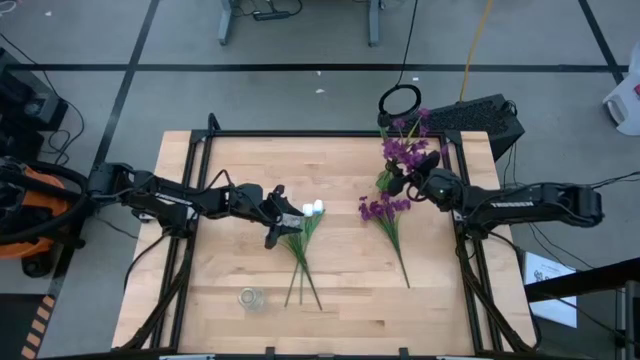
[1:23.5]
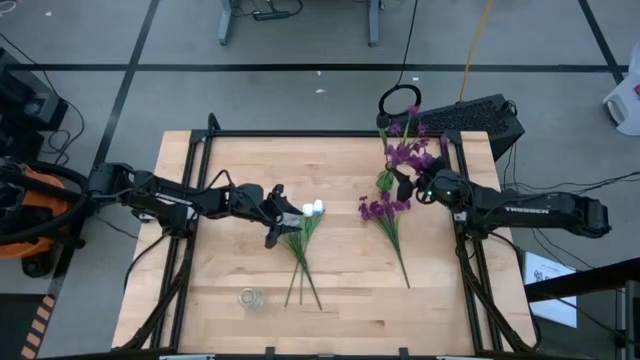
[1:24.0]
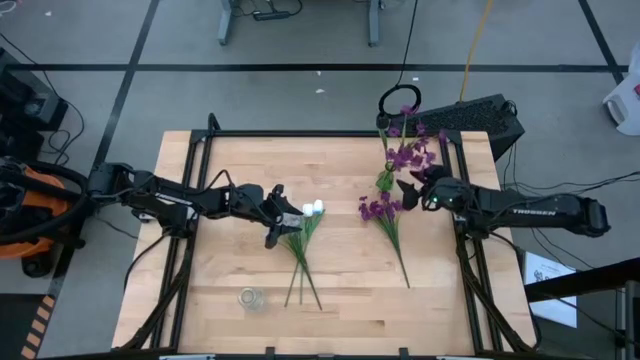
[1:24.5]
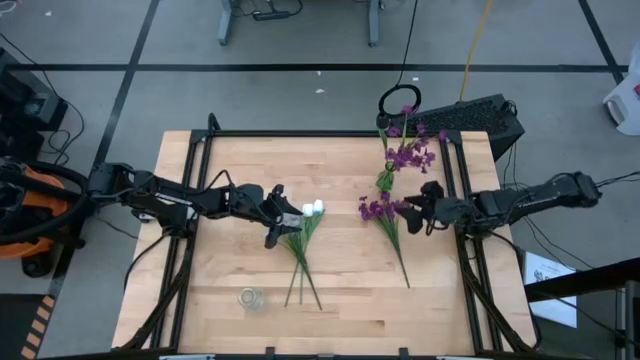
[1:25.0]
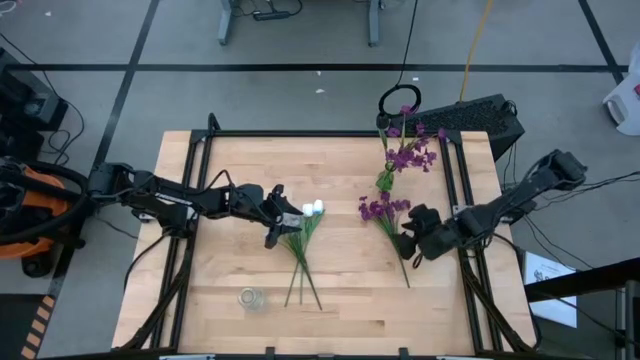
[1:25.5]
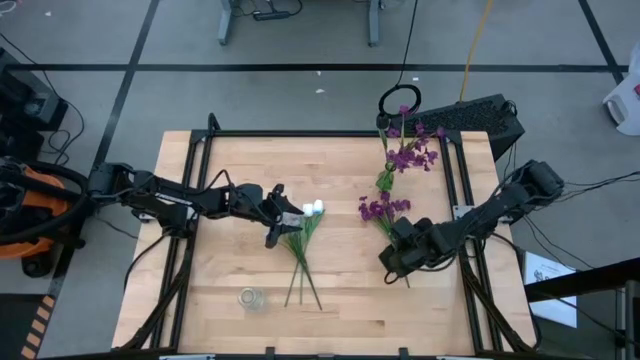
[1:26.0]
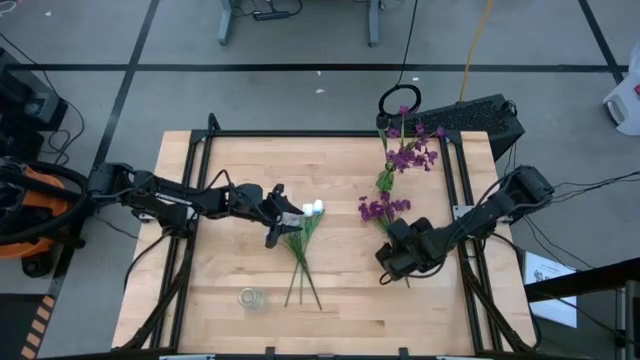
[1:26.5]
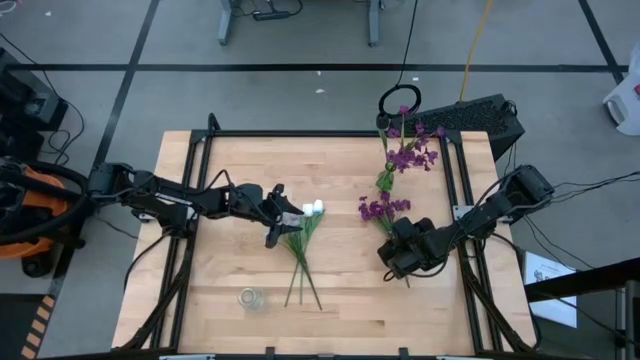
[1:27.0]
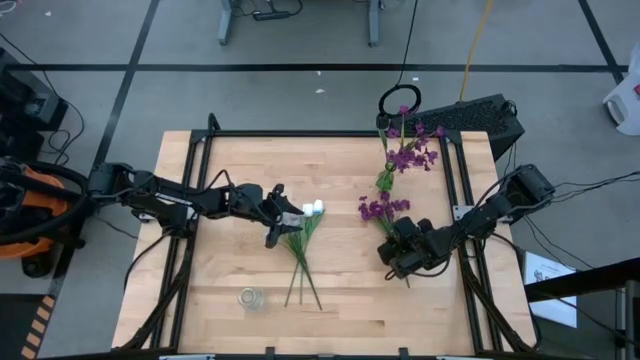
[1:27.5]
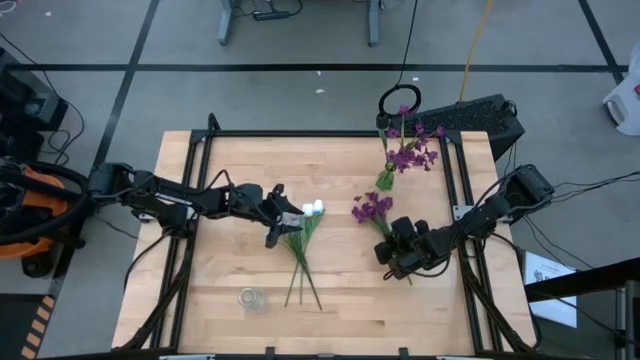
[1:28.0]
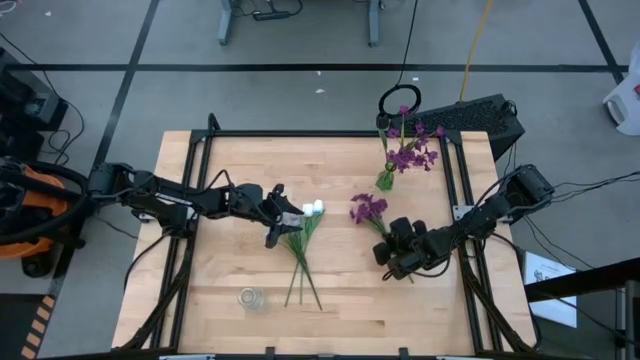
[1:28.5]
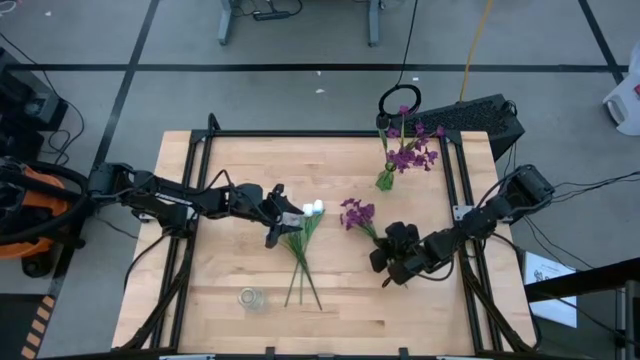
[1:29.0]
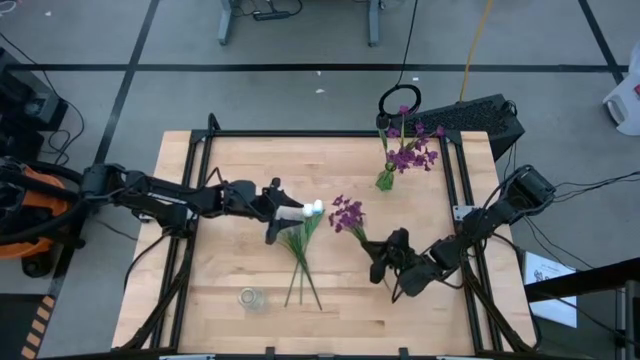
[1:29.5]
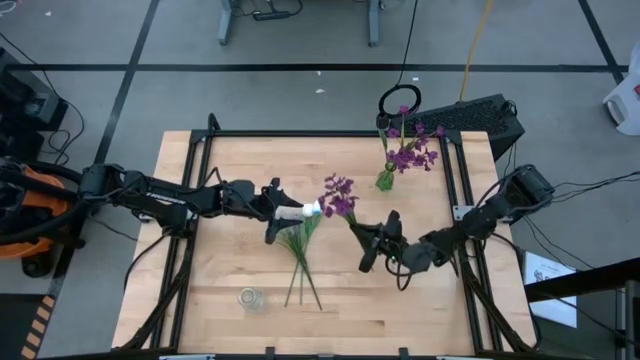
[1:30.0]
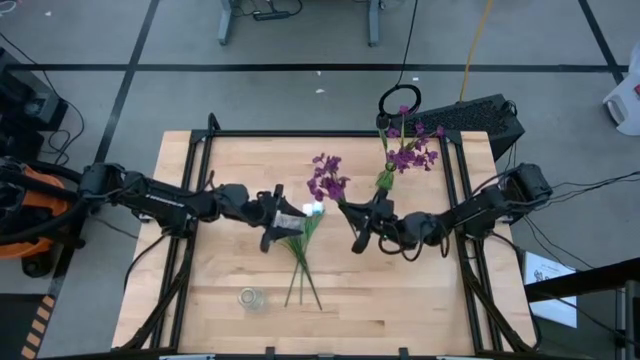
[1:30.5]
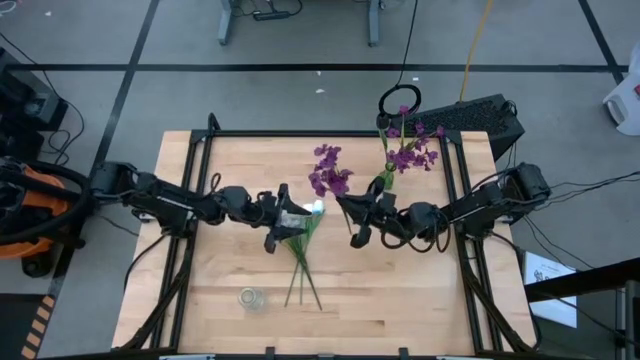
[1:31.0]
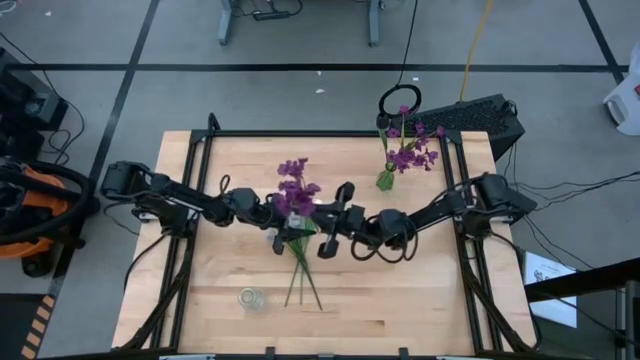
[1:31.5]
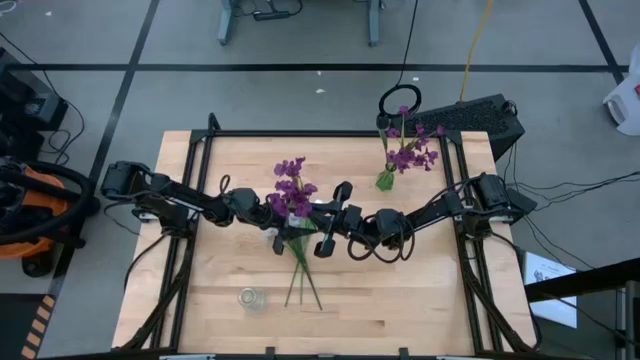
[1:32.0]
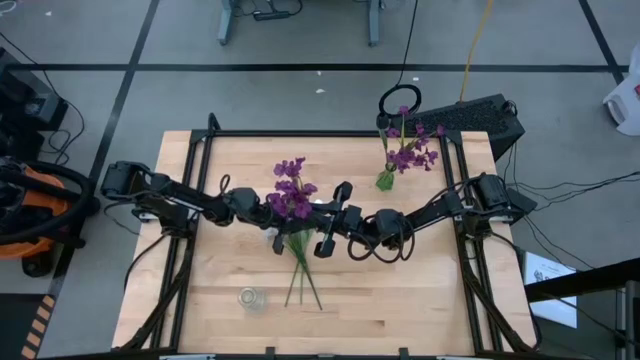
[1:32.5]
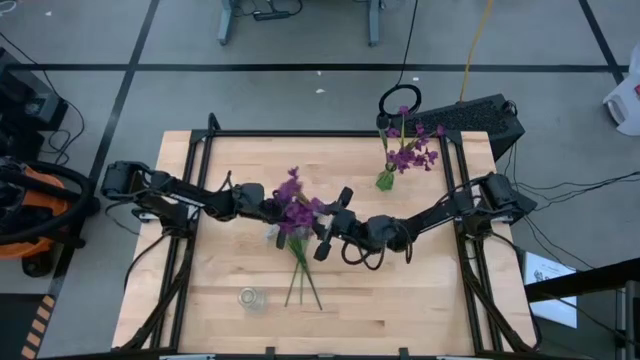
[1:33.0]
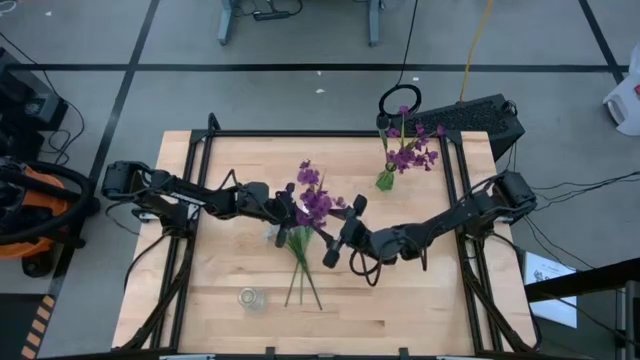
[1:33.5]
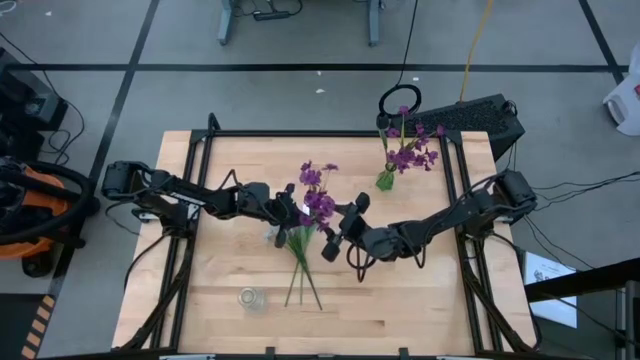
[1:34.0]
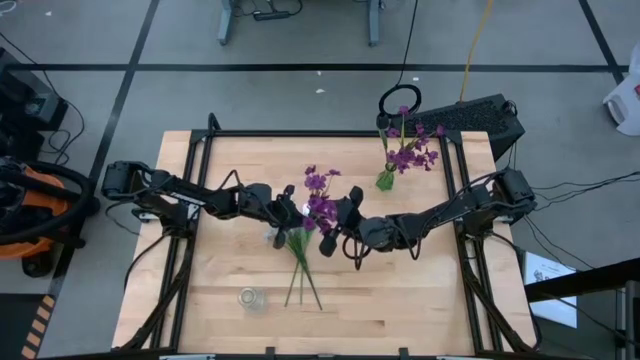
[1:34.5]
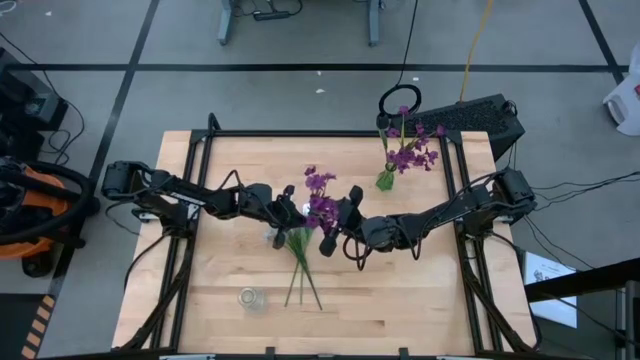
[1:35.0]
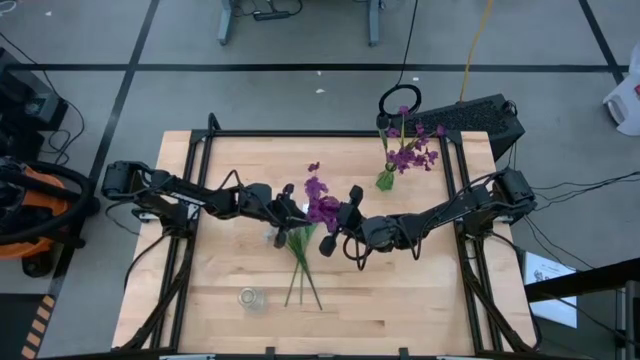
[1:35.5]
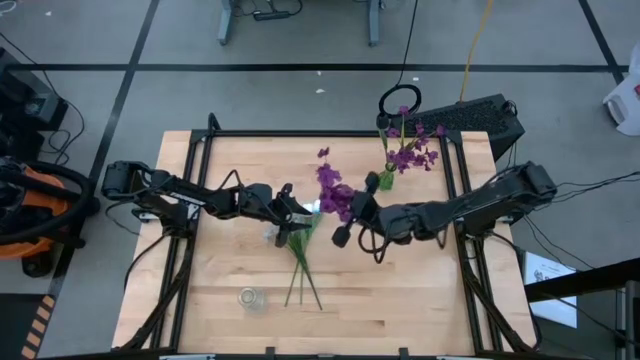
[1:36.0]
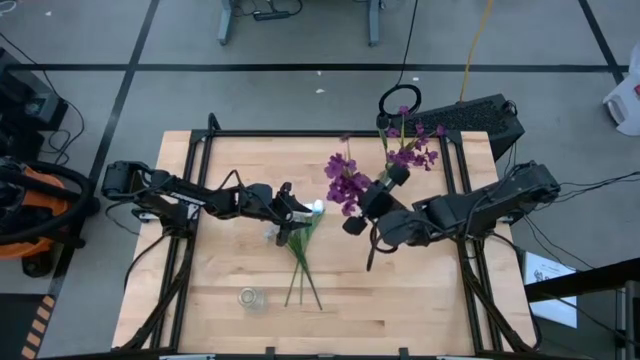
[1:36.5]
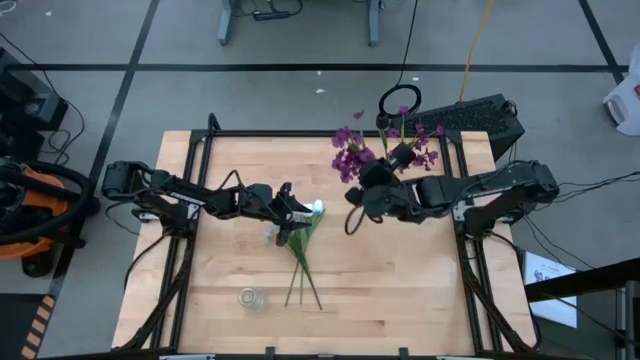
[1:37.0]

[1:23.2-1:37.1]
Task: Sort flowers into vase by color
Put the violet flower into the green vase

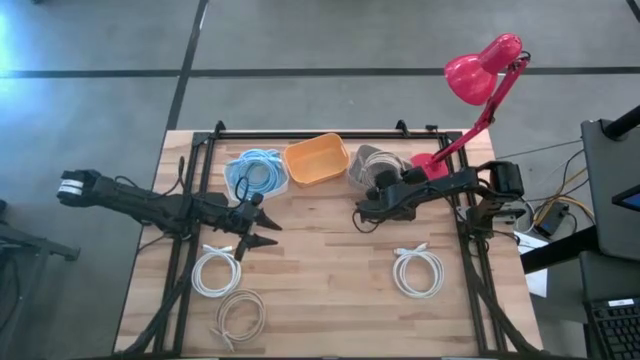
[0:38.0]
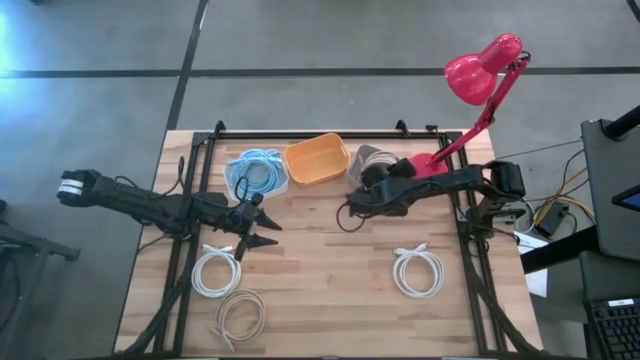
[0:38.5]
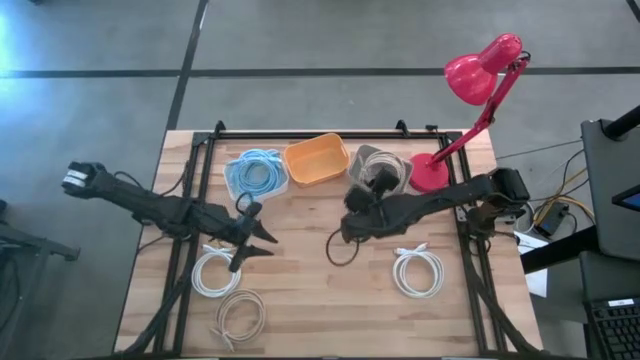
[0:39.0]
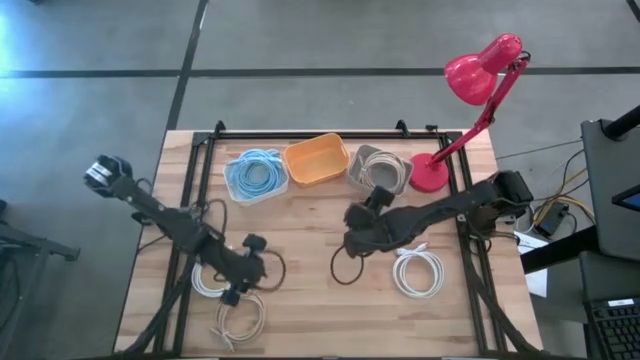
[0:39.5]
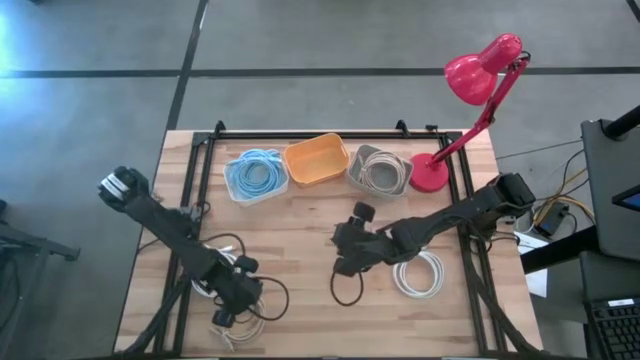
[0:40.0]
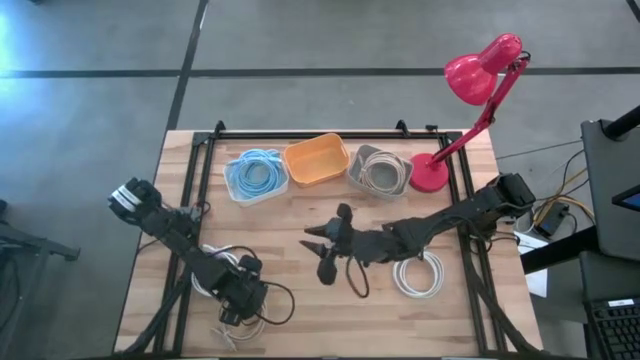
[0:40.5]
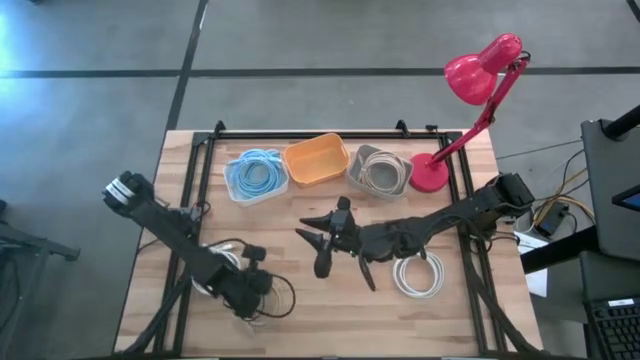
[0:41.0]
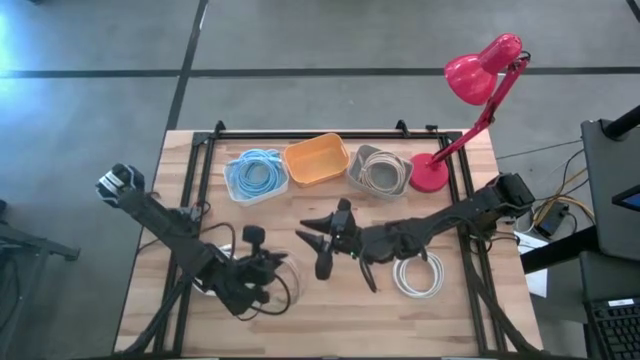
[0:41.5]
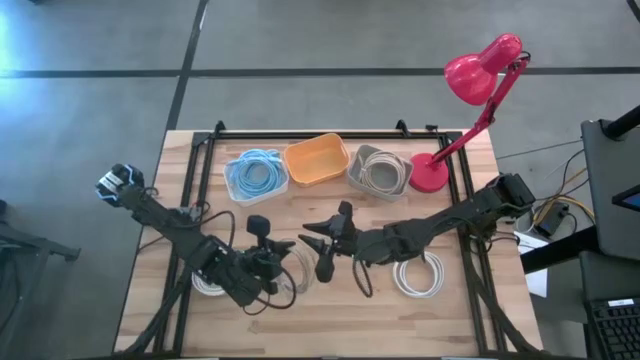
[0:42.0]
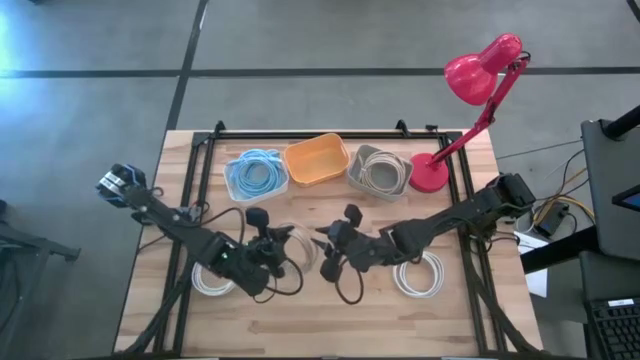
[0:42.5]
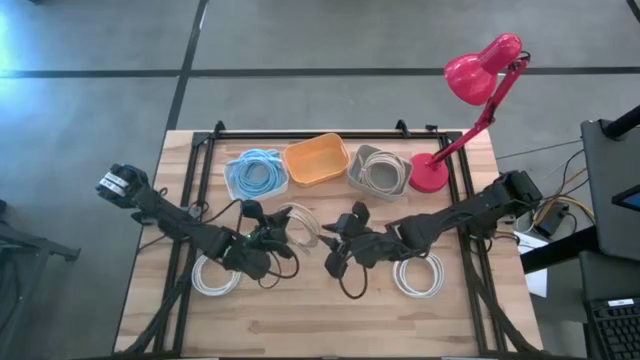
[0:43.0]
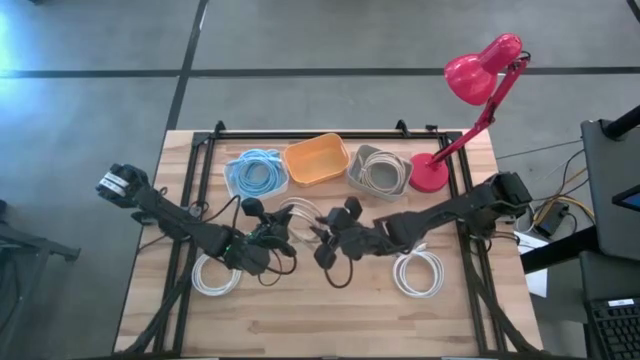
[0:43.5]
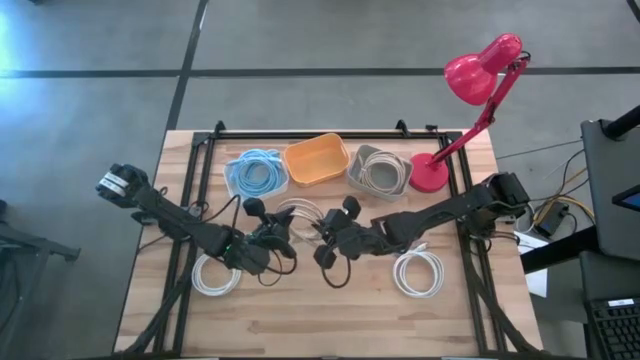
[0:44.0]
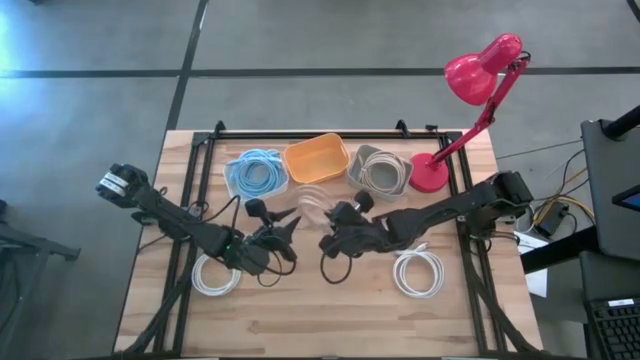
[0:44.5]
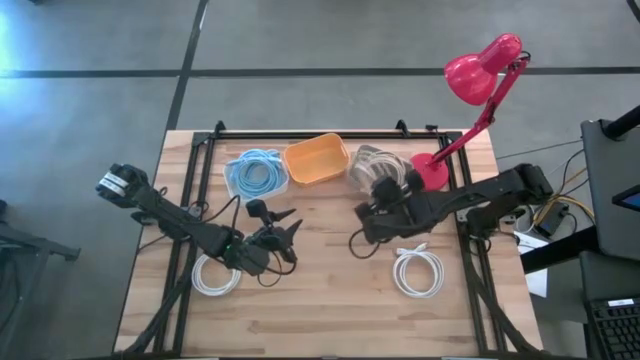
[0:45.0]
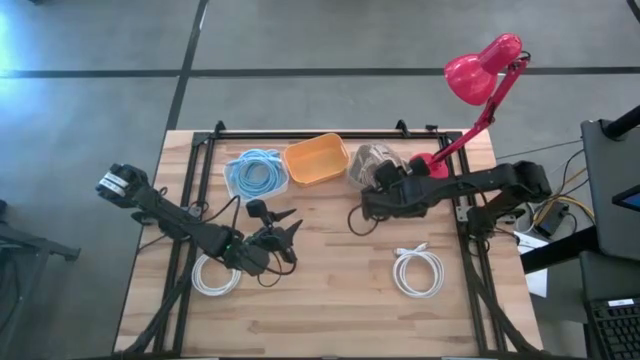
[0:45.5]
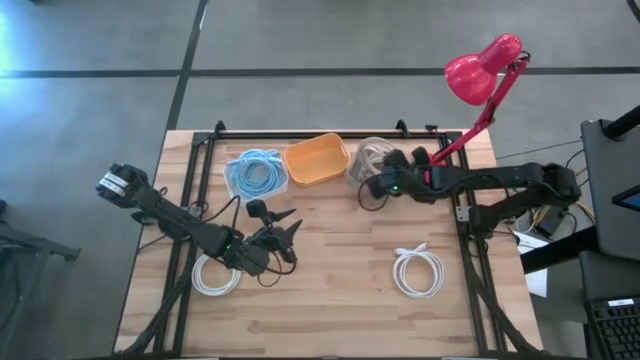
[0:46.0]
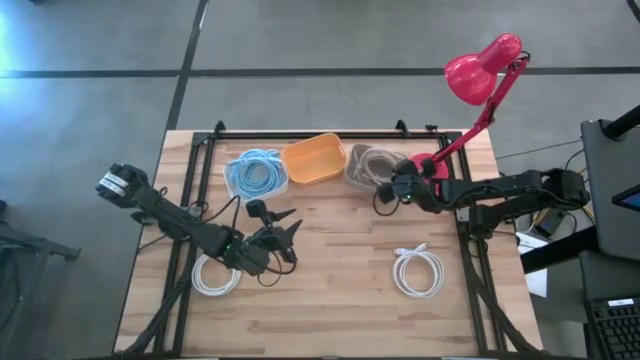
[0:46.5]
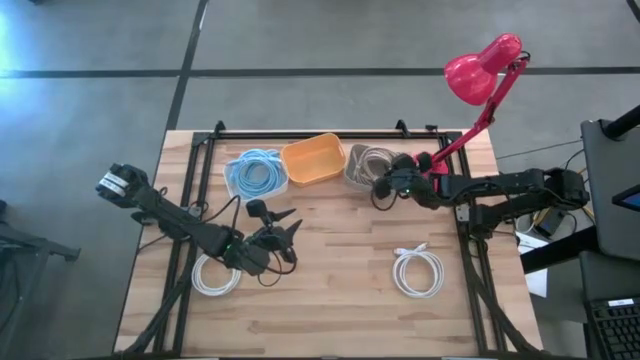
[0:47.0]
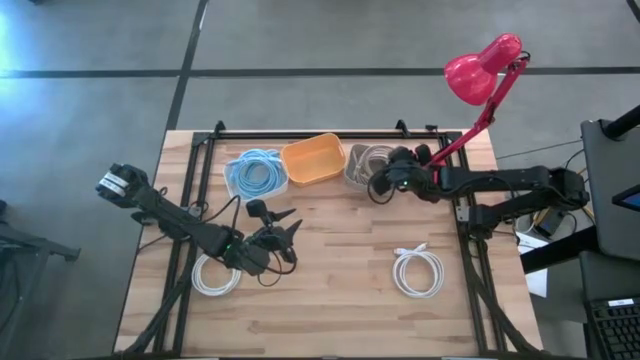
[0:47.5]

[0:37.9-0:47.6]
Task: Pick & Place USB Port
Put the brown charger cable into the gray bin
